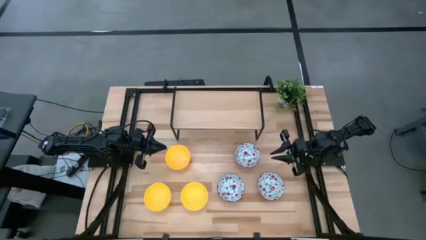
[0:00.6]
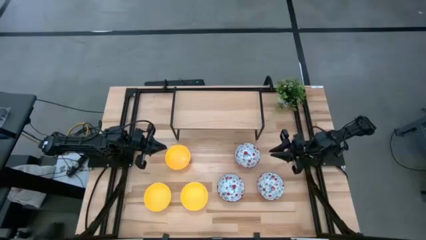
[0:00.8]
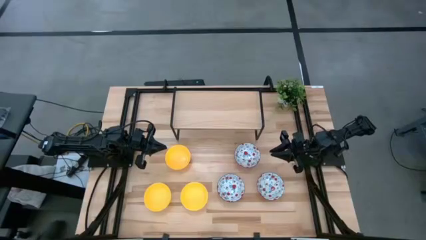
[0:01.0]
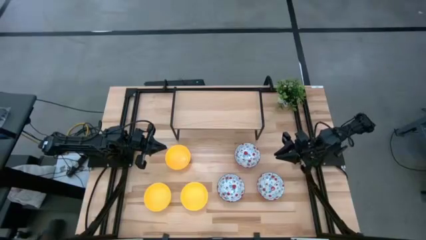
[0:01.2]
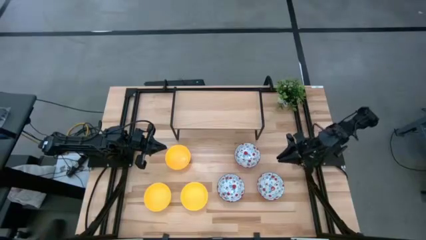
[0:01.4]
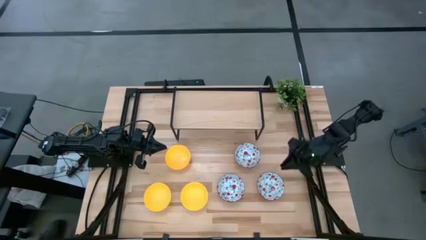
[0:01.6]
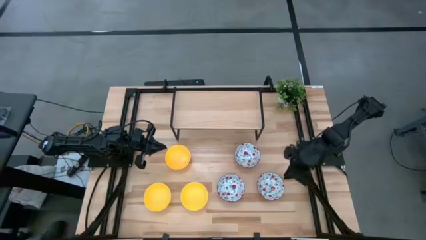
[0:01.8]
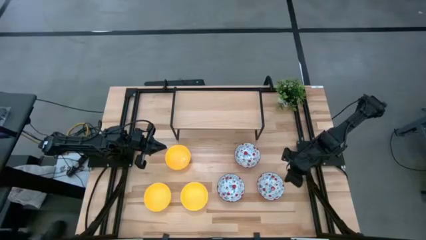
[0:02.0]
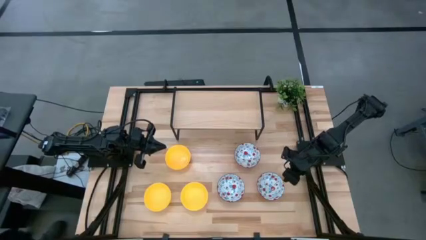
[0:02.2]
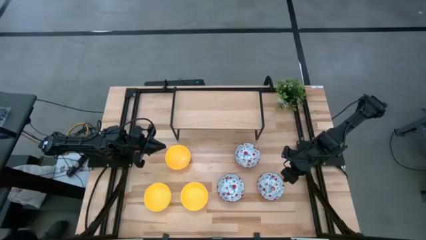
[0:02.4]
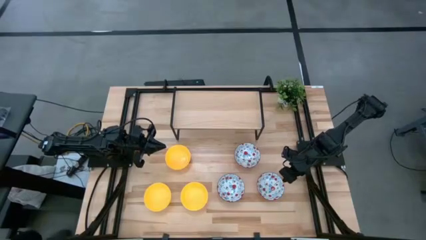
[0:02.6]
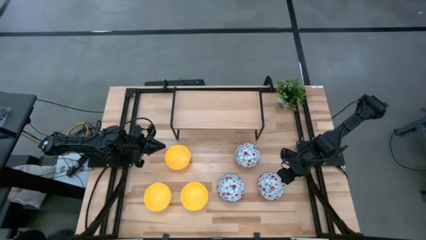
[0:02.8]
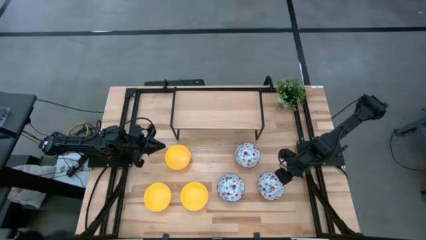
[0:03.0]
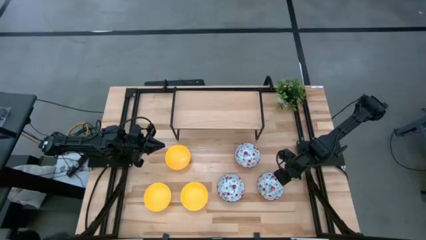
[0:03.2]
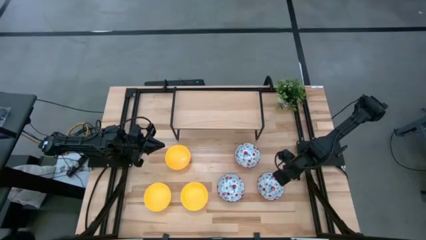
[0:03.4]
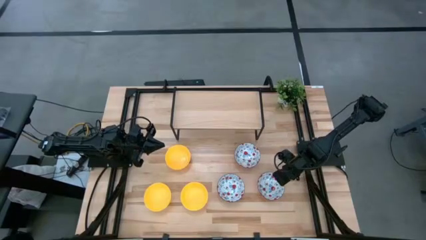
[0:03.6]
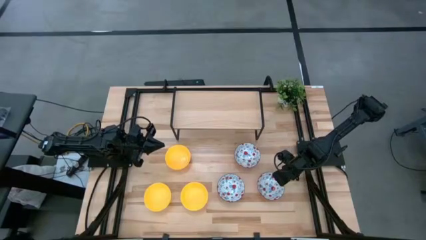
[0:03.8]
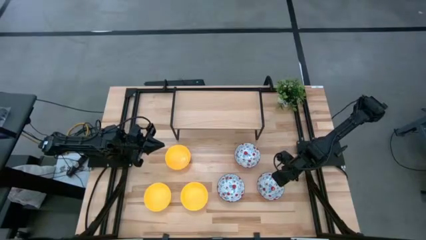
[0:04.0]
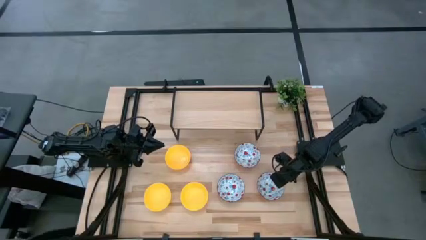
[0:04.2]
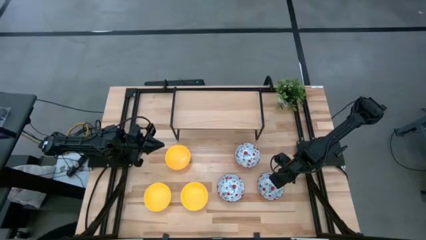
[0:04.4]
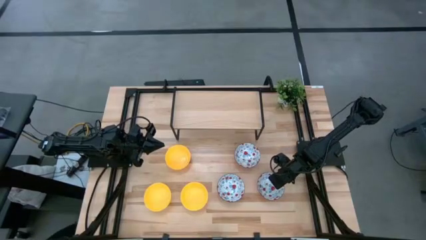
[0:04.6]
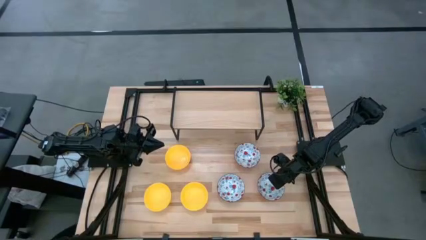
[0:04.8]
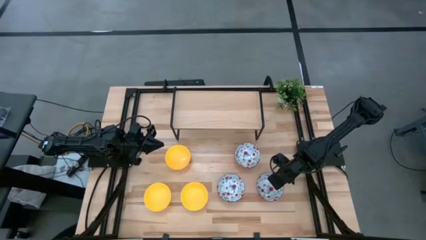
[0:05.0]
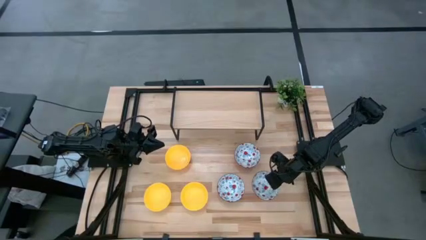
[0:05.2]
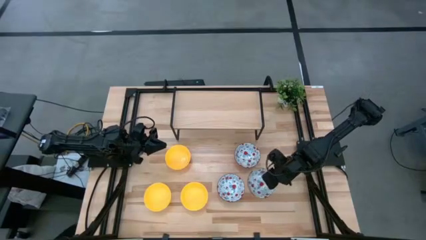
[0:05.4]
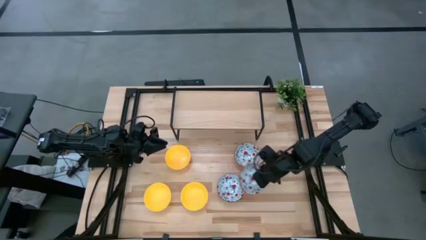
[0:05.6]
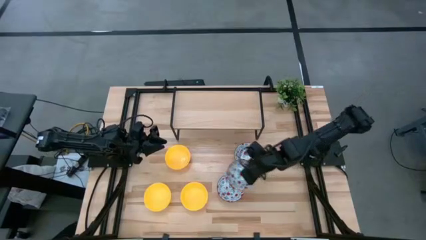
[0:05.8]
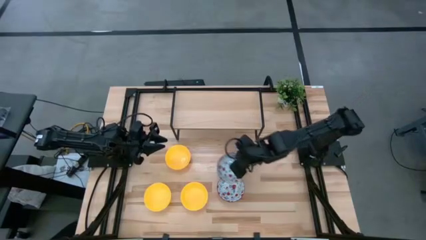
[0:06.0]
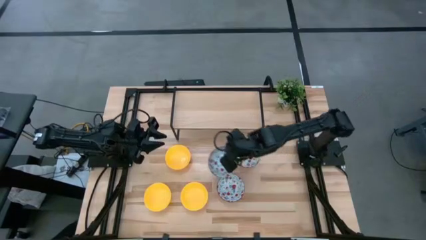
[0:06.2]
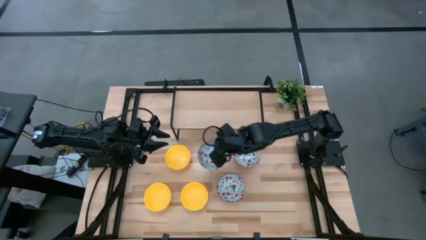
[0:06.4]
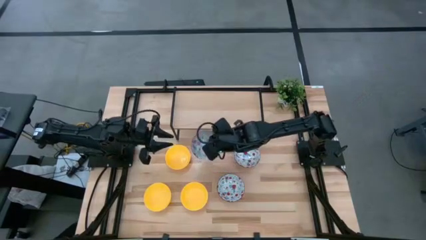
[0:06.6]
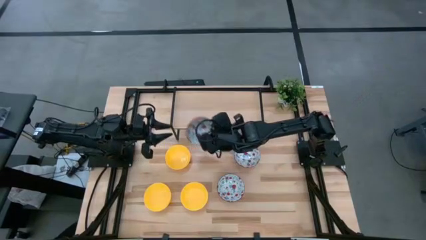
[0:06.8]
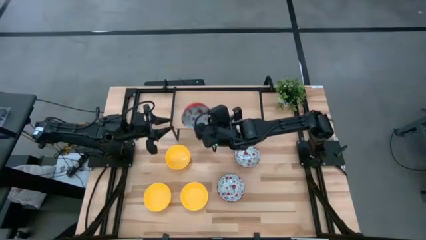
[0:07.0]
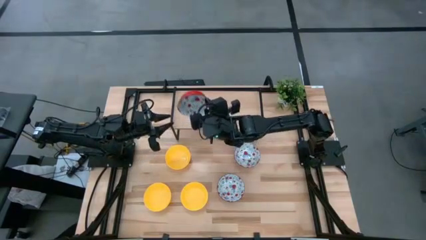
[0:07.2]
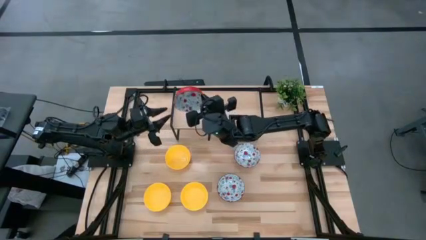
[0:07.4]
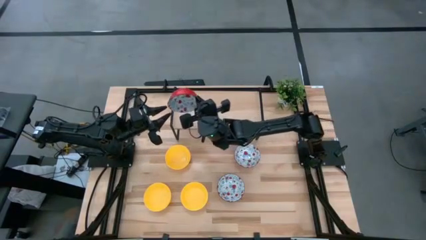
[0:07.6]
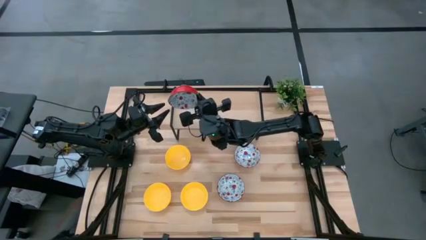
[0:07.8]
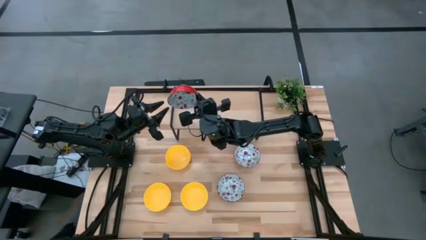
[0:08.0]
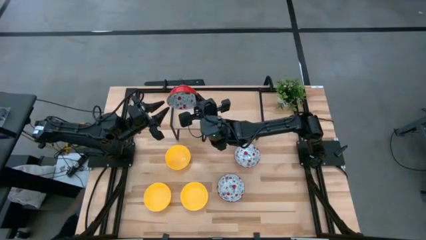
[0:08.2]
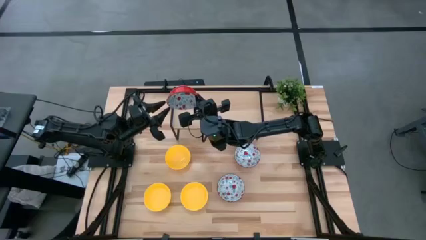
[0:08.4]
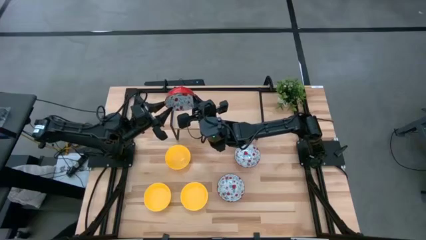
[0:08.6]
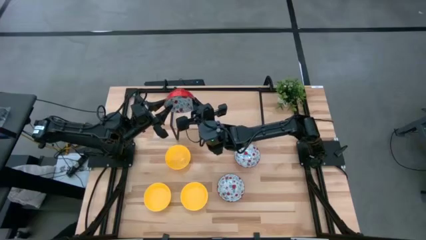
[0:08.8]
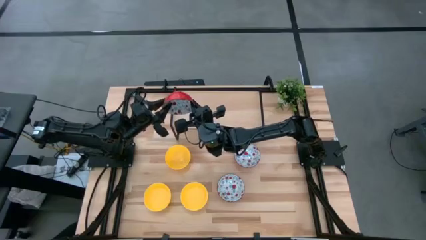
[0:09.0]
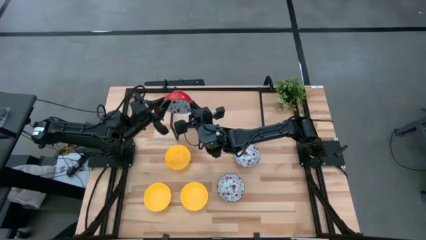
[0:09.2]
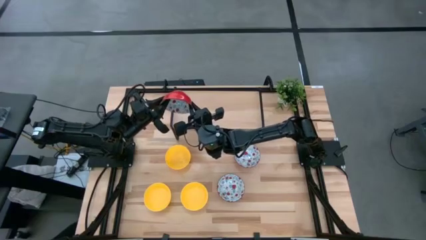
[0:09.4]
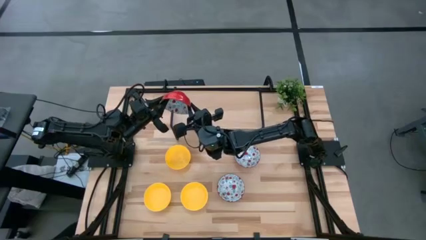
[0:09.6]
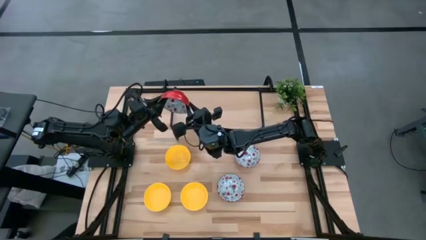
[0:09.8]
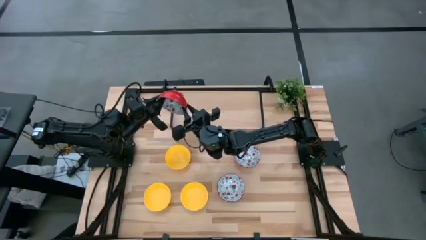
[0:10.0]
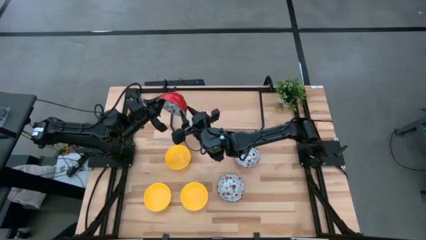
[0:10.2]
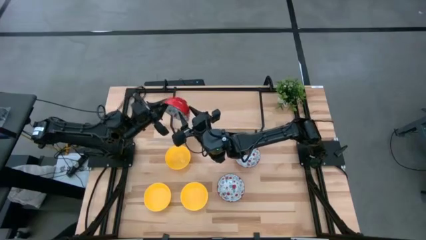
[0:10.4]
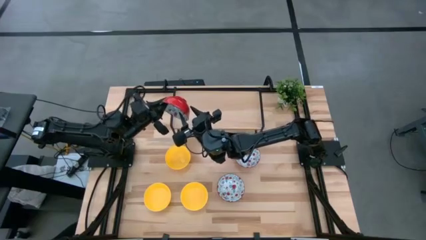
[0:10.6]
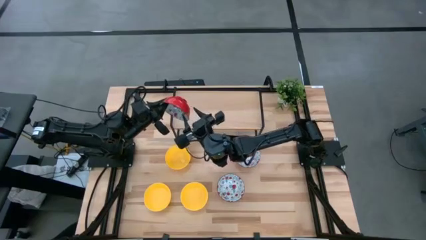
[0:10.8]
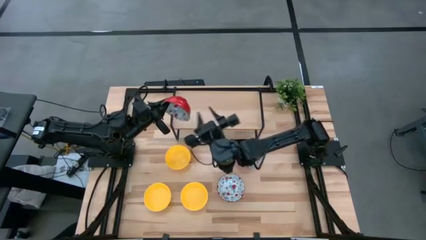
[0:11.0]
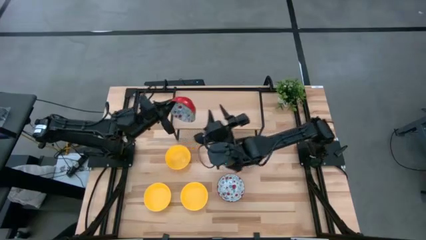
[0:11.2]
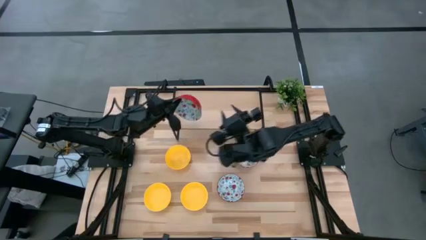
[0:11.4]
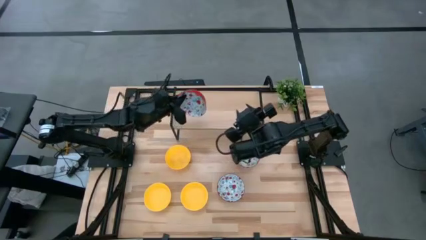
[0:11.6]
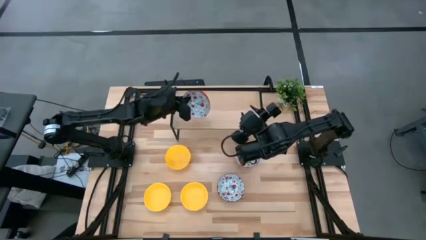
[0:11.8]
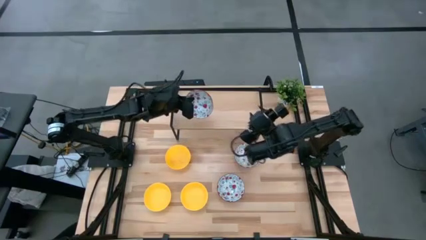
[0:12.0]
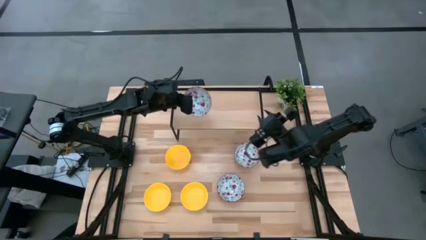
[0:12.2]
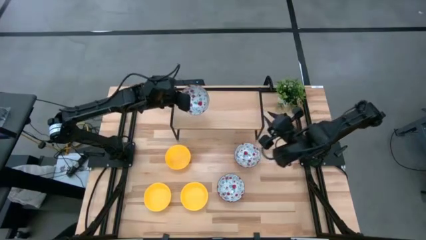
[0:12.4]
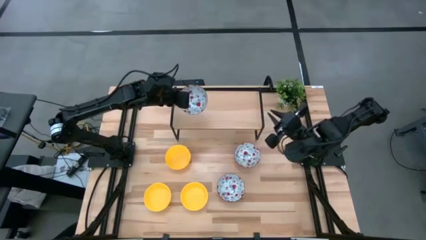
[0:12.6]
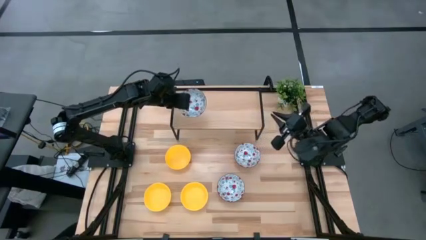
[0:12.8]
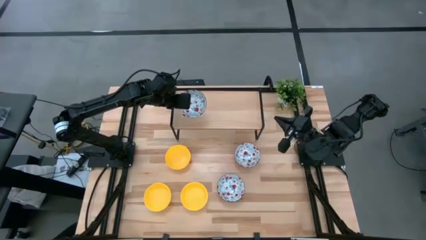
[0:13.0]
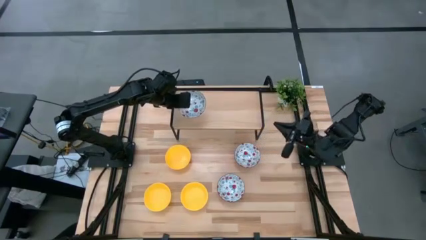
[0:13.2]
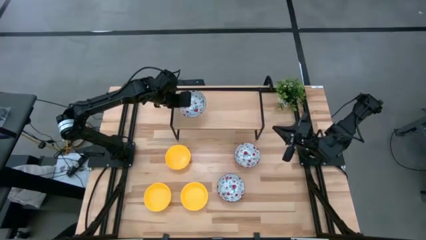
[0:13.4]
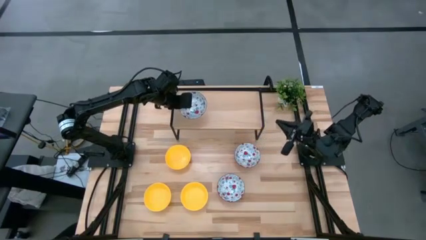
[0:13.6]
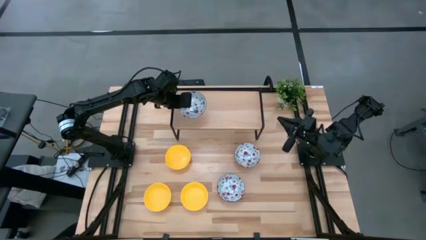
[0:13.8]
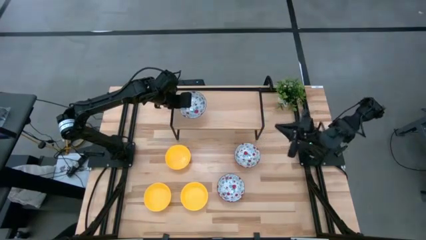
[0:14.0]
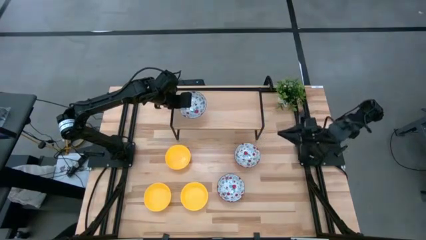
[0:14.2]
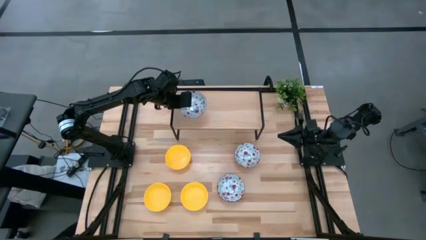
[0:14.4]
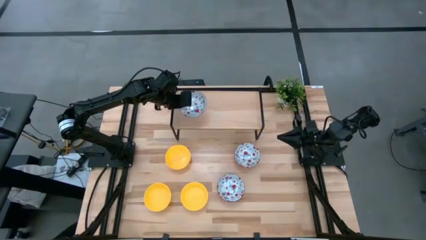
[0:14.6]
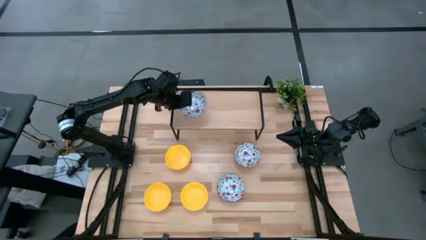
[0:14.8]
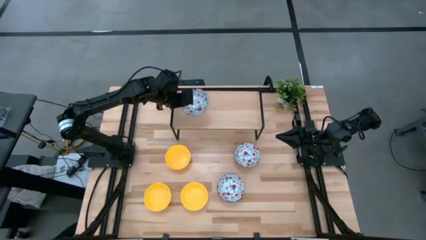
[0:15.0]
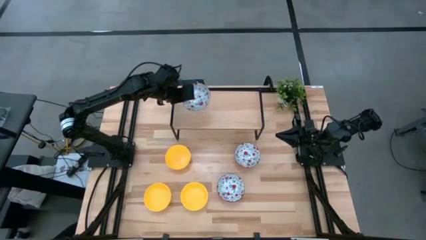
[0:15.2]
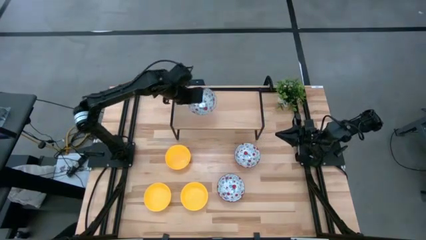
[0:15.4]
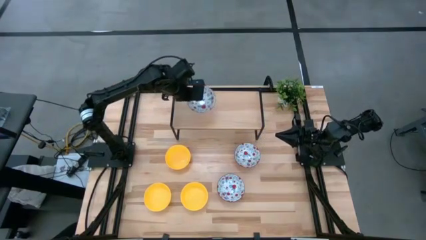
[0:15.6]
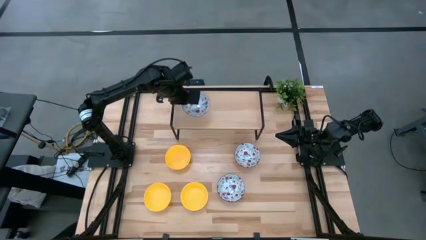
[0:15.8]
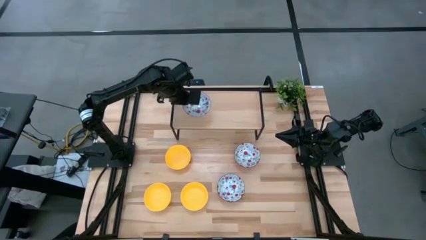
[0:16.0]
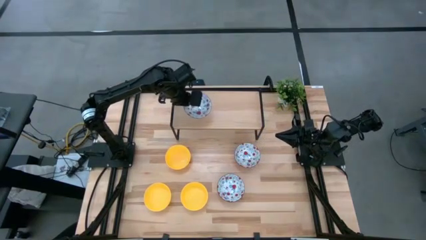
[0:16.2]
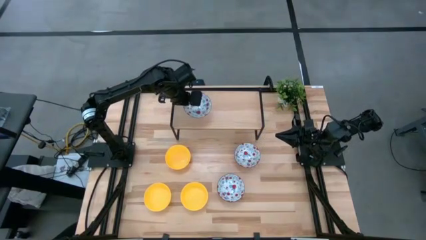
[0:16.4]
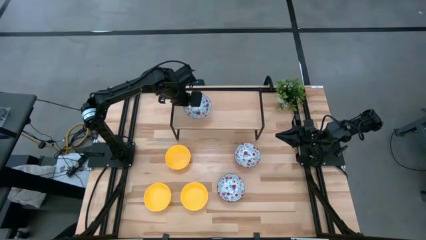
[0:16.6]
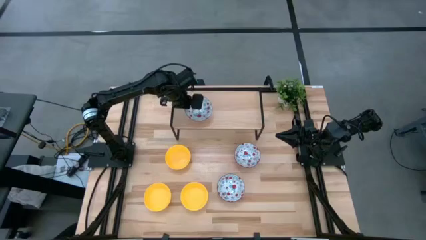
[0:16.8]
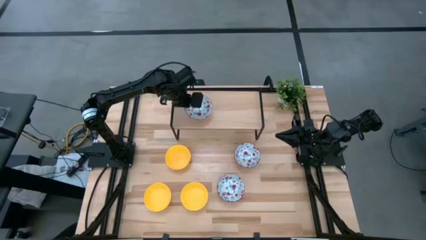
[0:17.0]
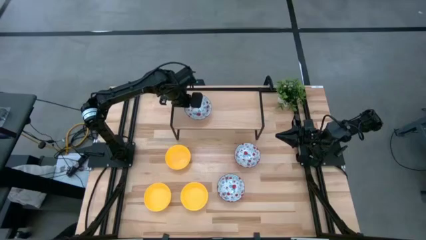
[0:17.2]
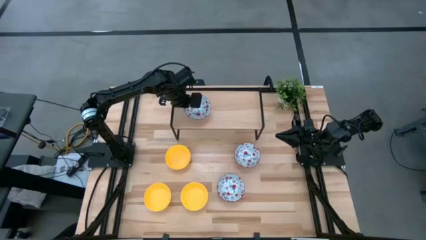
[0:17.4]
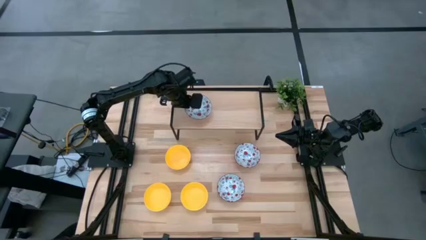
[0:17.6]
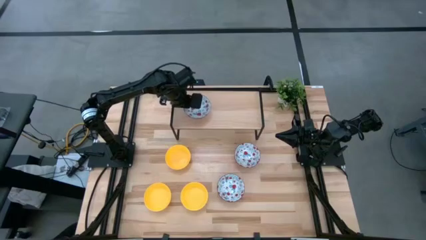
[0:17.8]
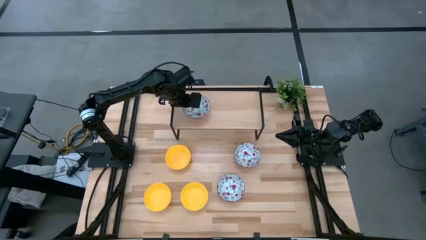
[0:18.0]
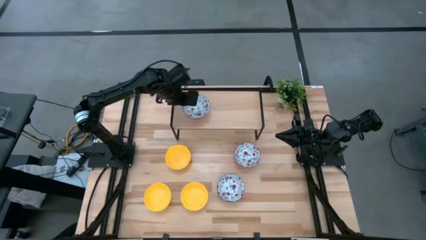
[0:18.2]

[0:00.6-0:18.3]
Task: Pick & Place Mini bowls
Put the bottom right red bowl on the shelf
